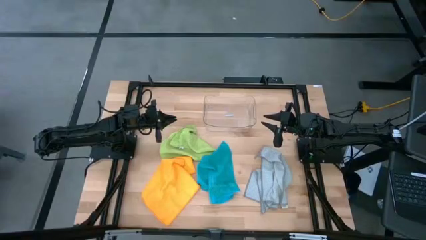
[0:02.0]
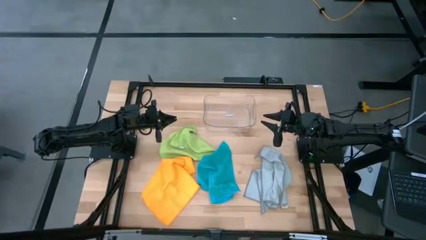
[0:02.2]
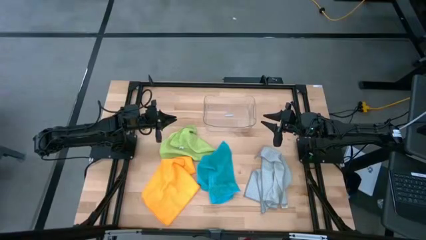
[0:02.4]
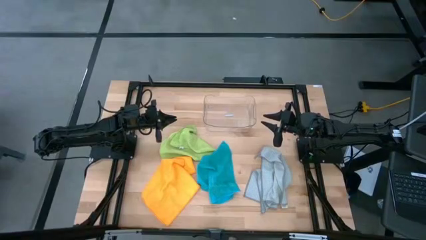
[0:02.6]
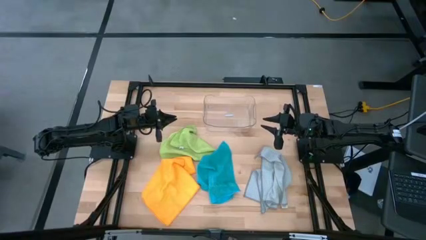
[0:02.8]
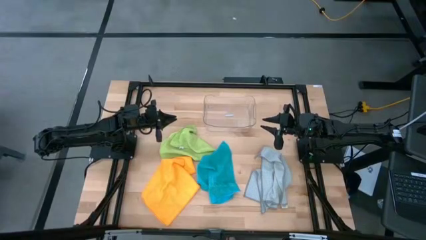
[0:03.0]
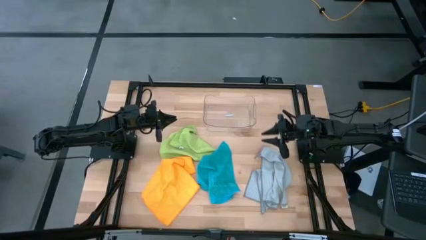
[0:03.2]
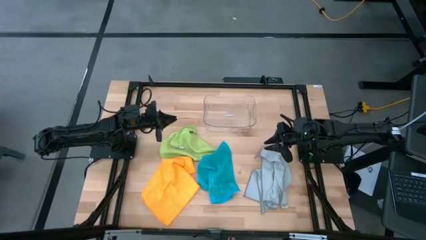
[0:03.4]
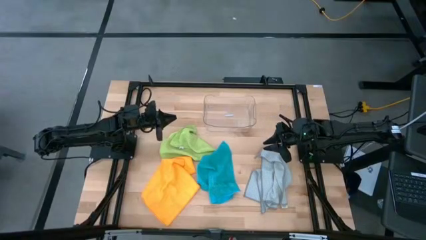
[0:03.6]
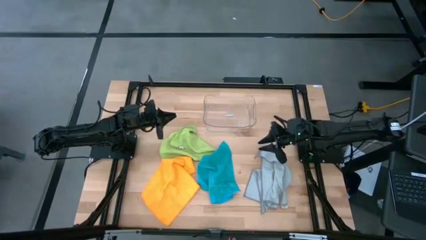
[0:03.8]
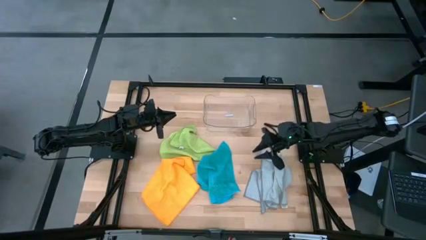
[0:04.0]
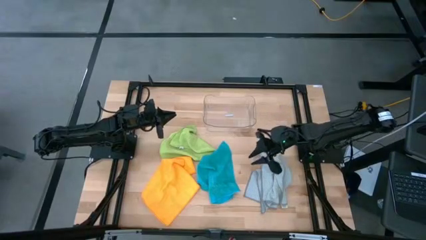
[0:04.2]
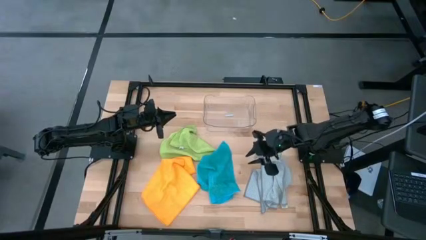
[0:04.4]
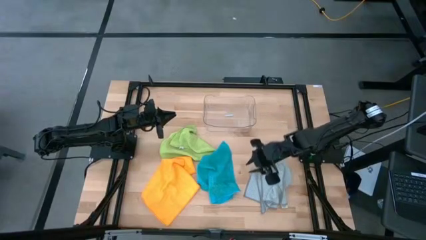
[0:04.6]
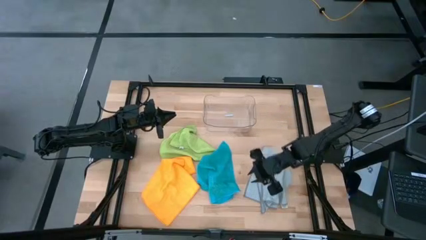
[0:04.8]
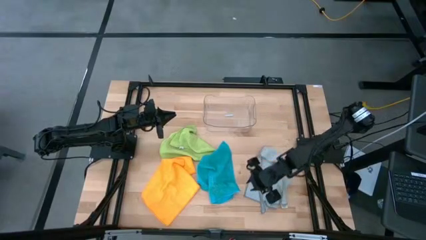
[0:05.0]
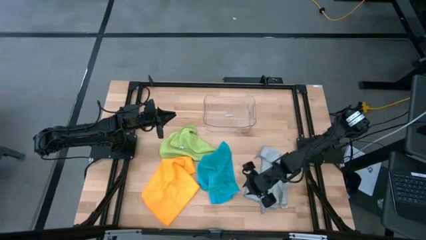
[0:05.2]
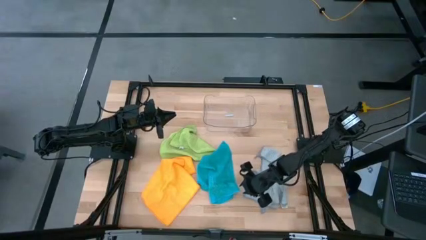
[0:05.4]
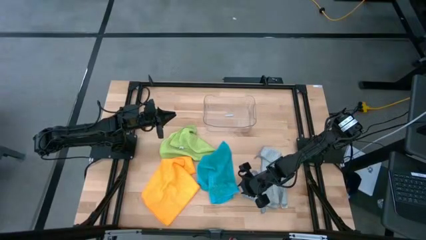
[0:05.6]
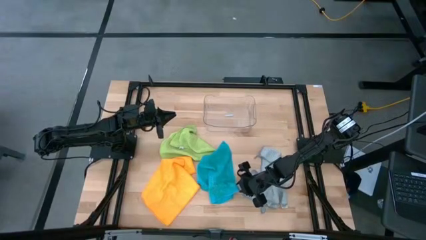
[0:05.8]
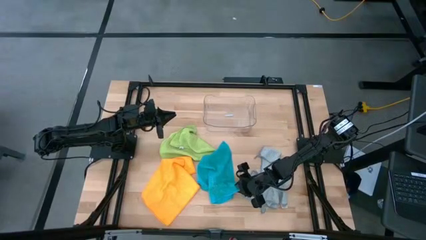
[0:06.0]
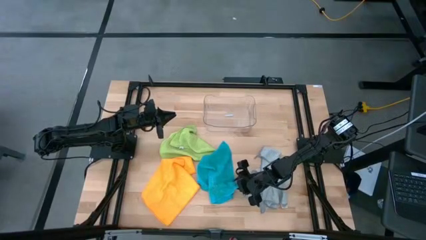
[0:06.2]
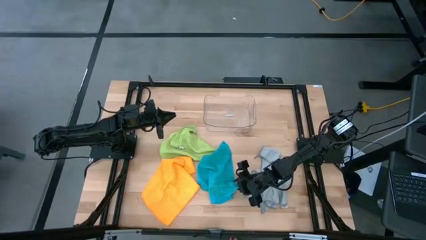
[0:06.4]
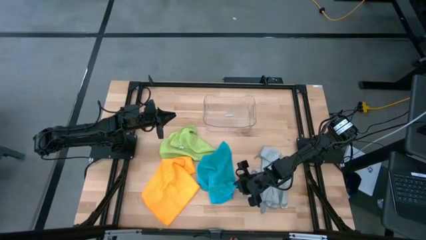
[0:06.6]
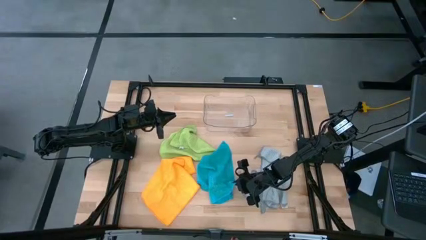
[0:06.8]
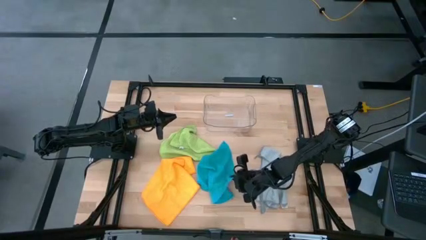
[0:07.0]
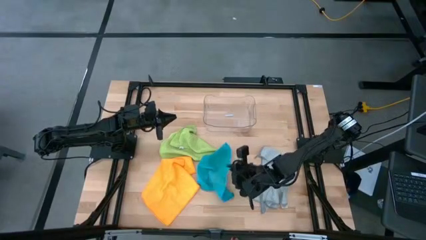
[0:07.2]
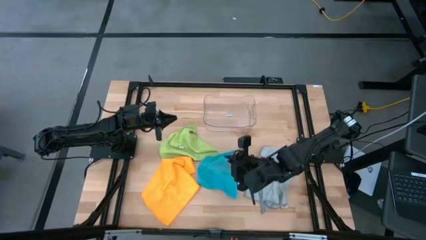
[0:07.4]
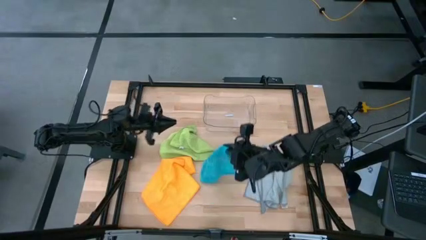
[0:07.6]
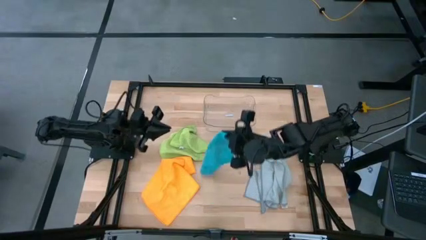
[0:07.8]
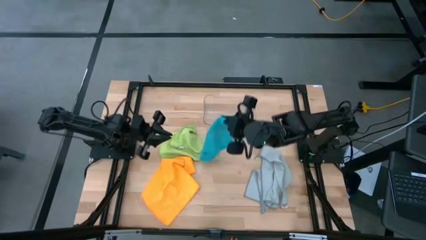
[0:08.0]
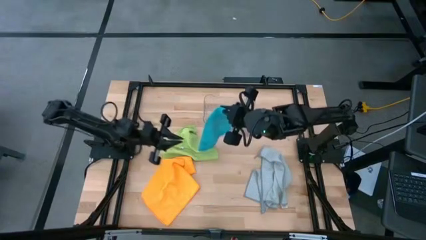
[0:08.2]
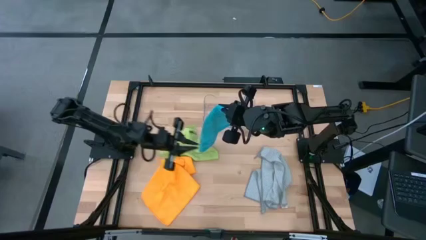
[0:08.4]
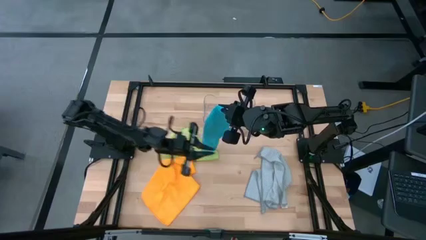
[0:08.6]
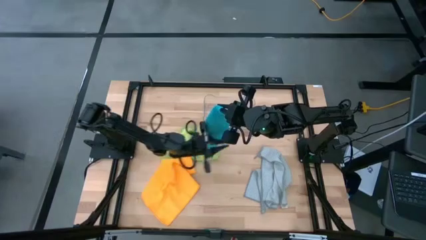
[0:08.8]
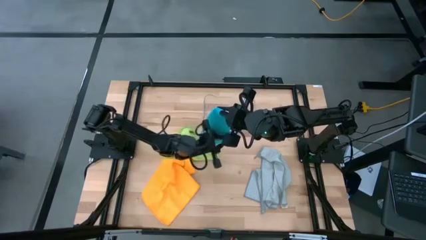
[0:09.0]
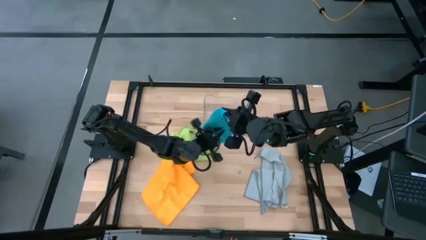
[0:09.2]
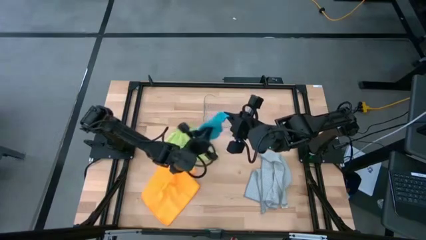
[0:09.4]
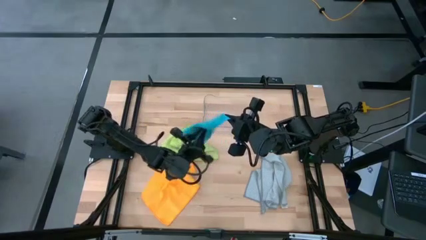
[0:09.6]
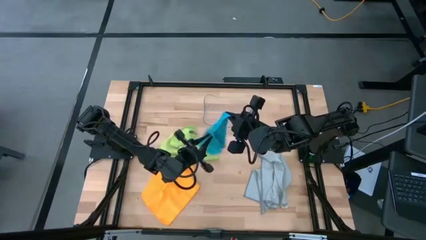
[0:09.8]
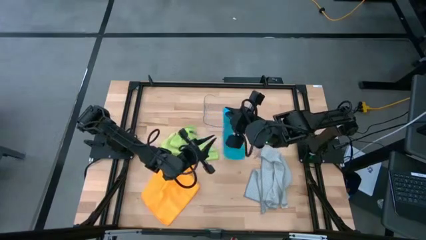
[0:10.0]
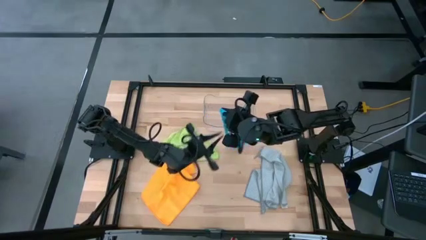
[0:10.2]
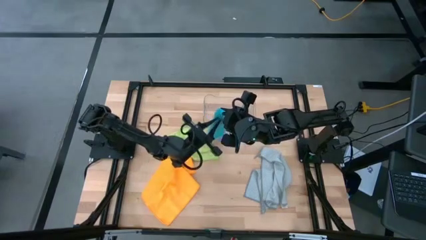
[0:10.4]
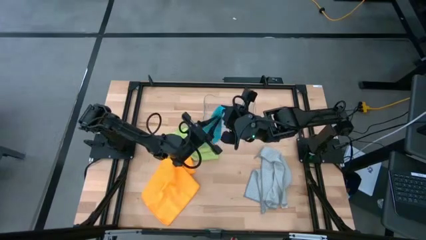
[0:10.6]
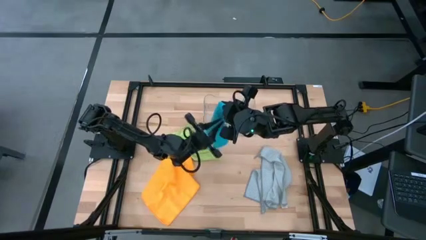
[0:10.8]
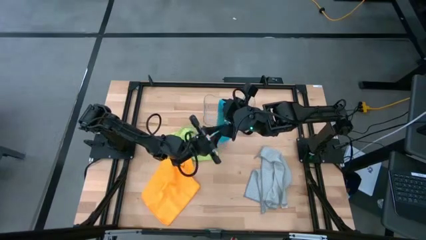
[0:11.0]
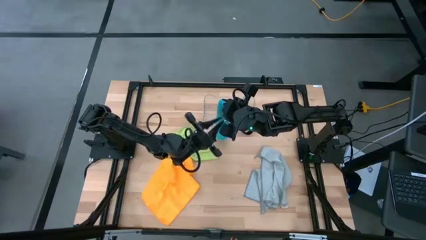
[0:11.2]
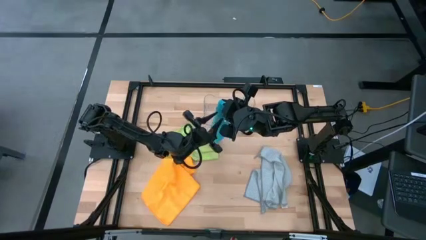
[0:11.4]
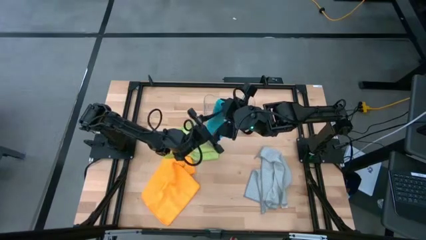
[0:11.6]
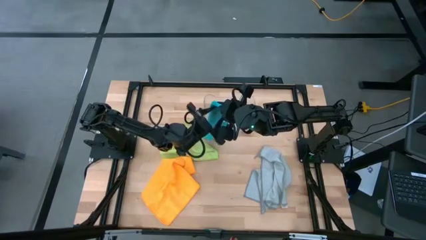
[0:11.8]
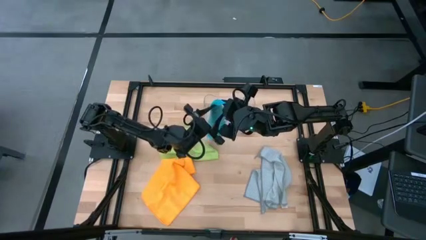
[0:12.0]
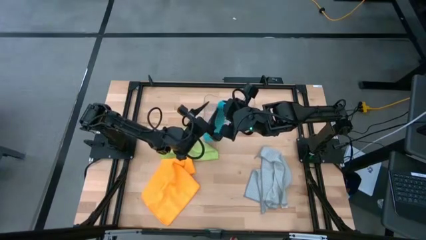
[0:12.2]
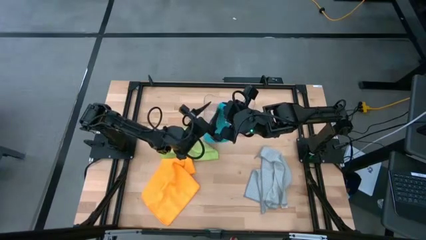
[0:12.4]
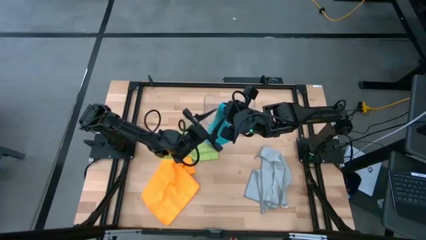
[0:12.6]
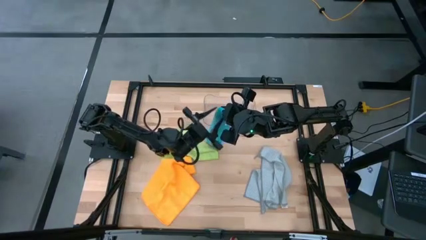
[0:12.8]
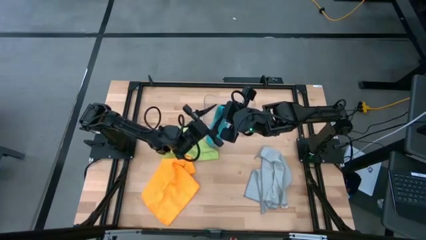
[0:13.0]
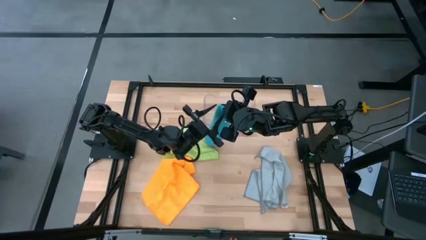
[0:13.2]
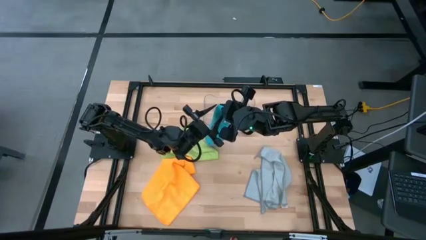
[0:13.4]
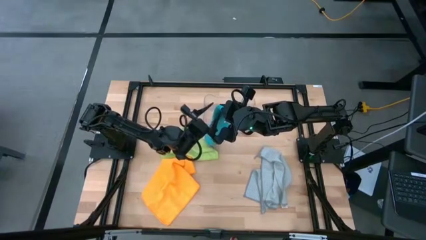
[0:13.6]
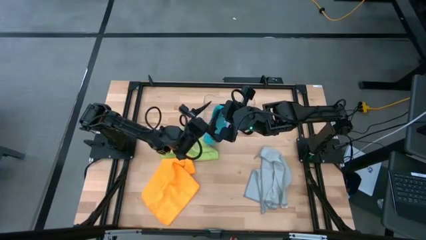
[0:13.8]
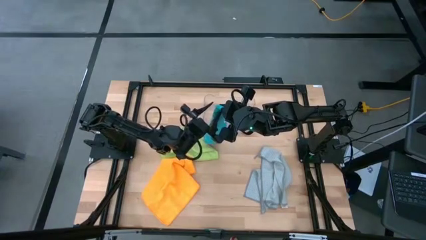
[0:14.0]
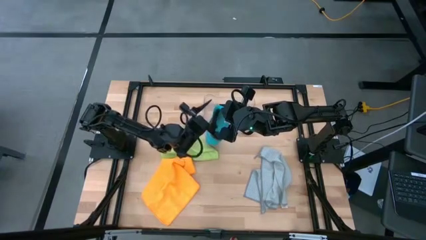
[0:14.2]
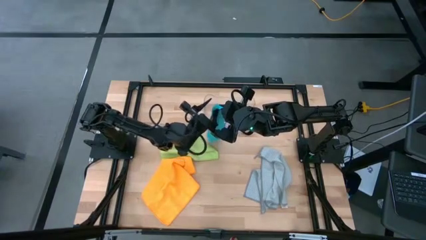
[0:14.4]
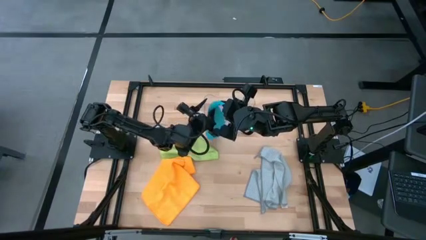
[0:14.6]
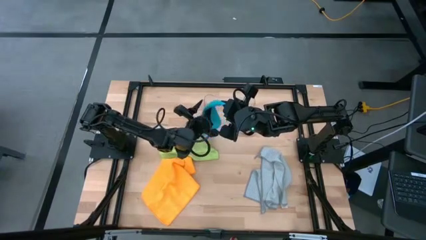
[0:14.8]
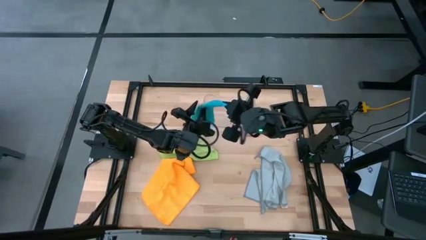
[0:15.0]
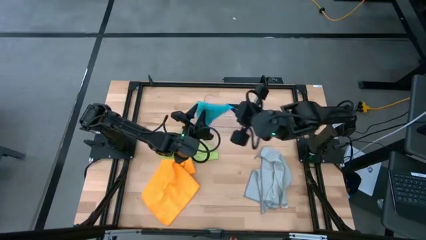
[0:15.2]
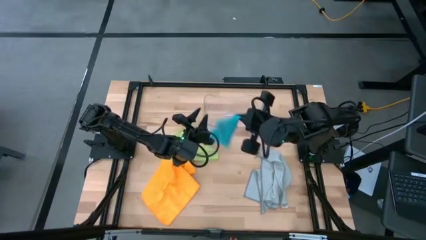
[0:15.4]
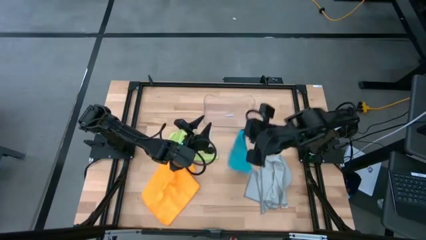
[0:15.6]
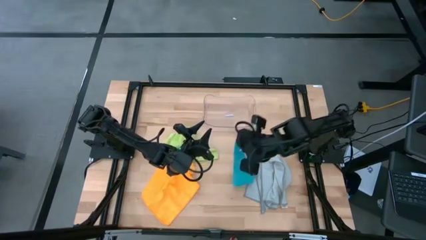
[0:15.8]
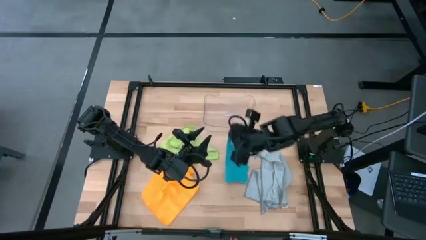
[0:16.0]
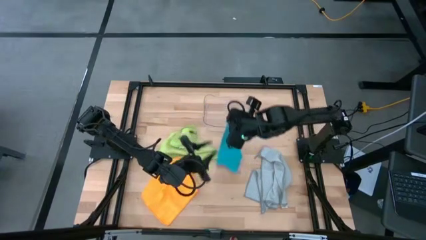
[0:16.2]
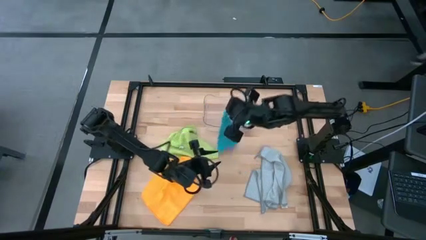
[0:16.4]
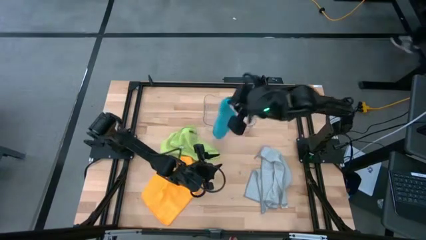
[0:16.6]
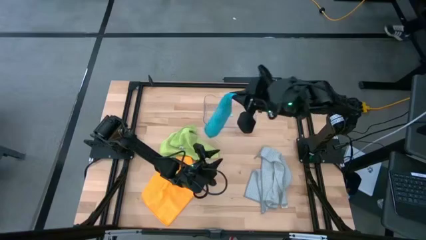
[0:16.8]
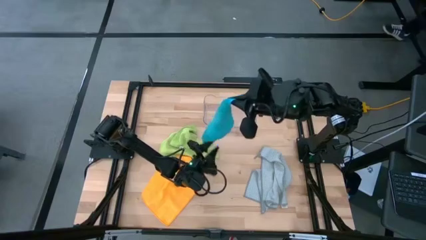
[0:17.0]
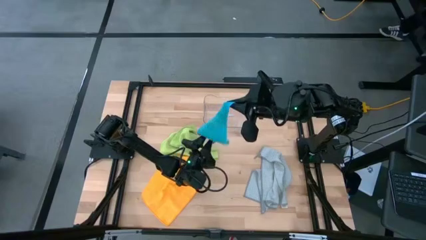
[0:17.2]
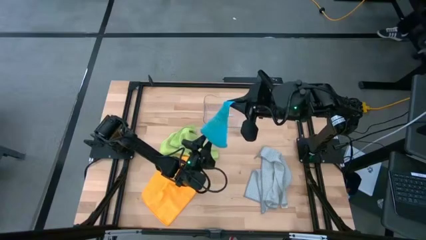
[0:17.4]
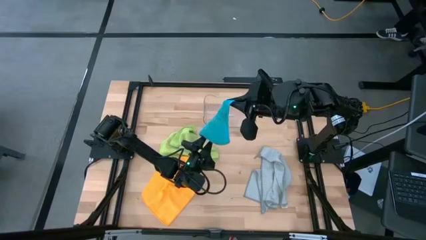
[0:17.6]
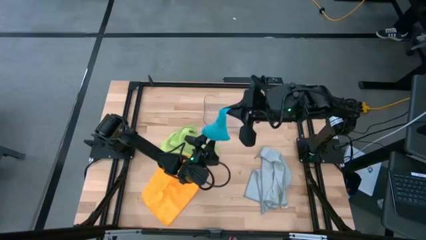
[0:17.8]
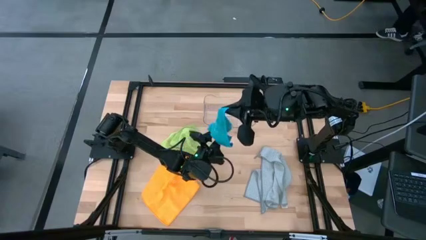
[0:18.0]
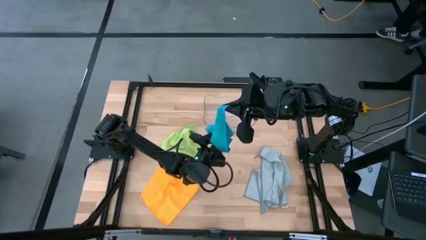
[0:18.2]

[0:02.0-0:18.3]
Task: Fold microfiber towels
Fold the blue towel
